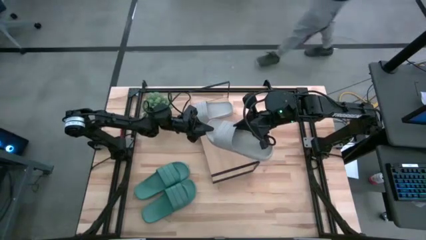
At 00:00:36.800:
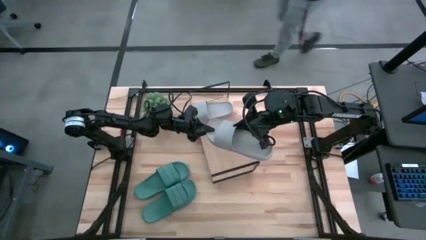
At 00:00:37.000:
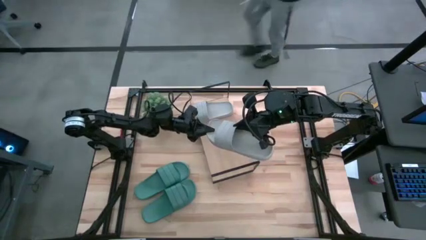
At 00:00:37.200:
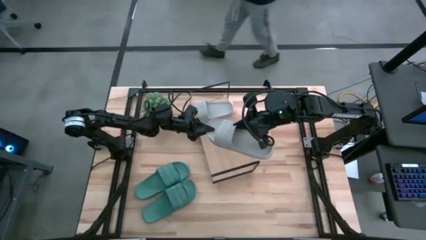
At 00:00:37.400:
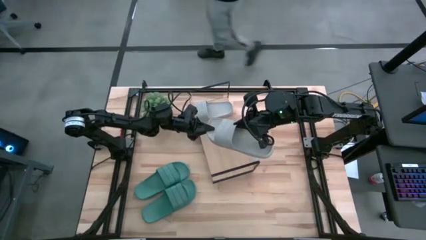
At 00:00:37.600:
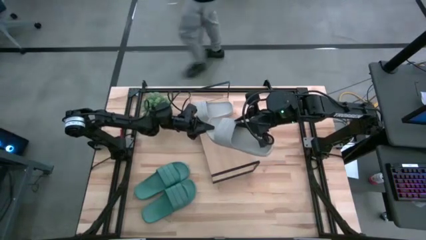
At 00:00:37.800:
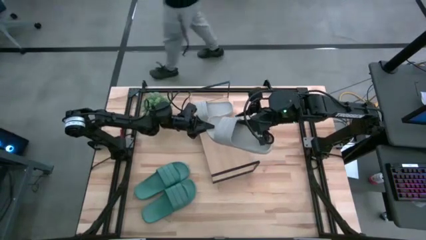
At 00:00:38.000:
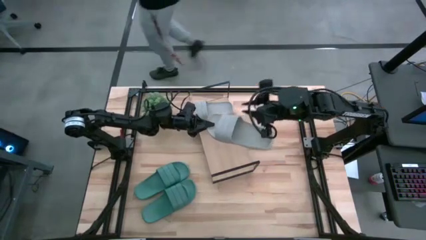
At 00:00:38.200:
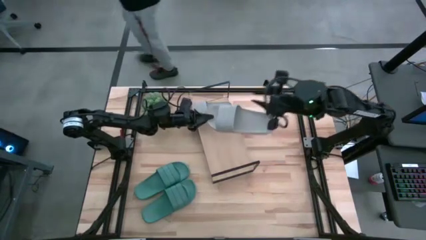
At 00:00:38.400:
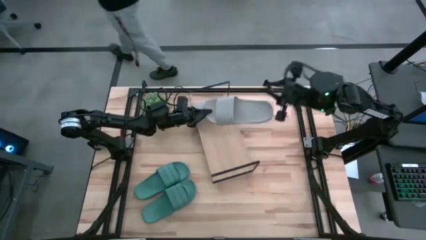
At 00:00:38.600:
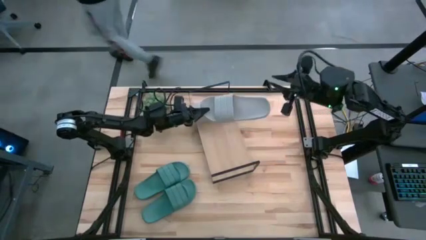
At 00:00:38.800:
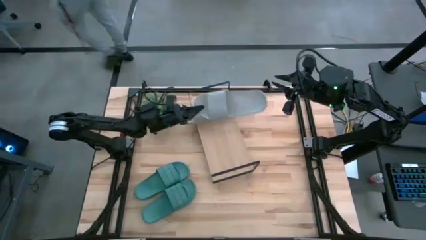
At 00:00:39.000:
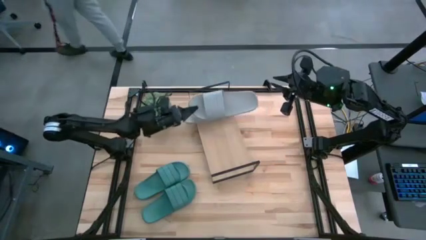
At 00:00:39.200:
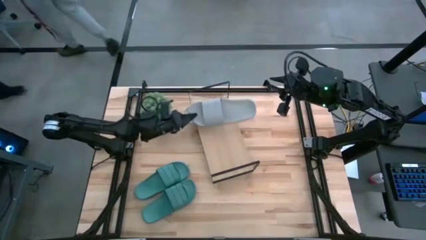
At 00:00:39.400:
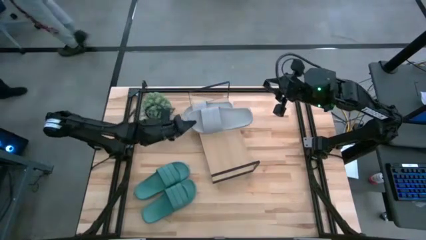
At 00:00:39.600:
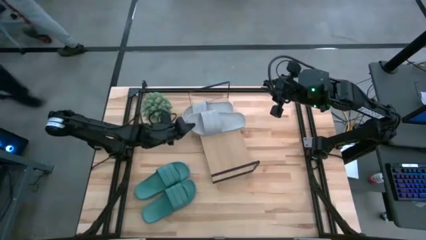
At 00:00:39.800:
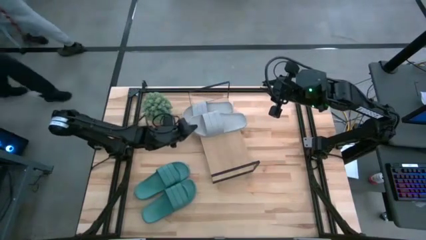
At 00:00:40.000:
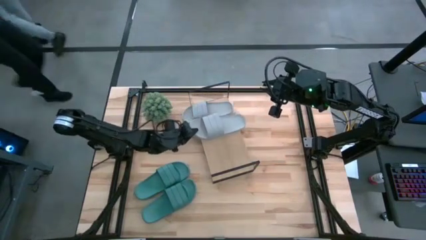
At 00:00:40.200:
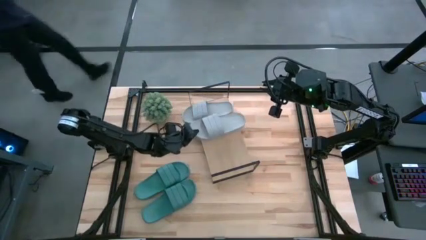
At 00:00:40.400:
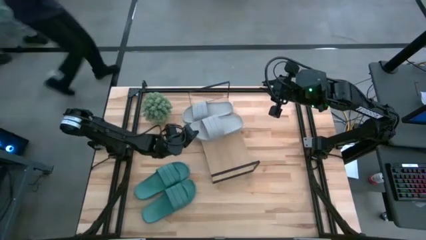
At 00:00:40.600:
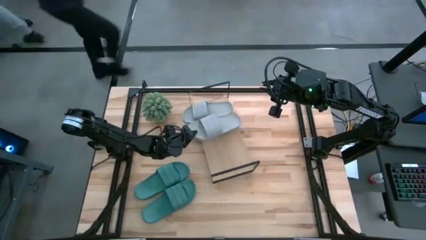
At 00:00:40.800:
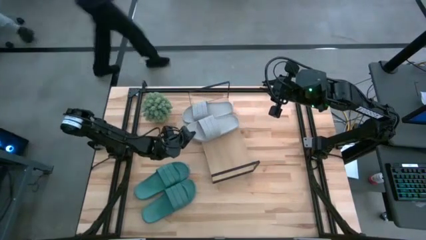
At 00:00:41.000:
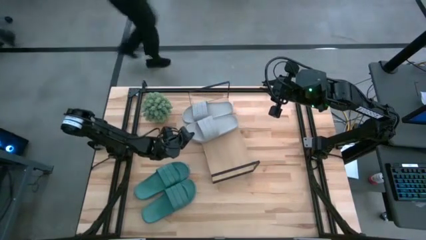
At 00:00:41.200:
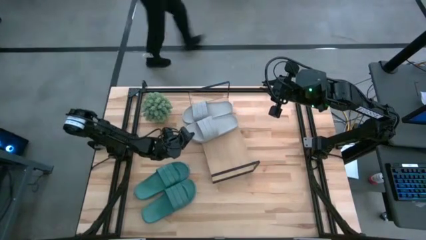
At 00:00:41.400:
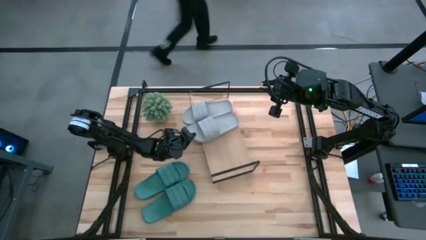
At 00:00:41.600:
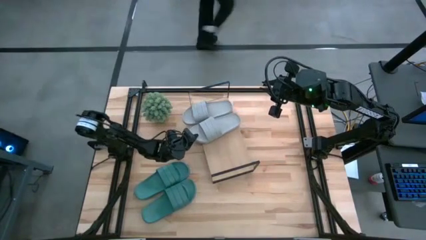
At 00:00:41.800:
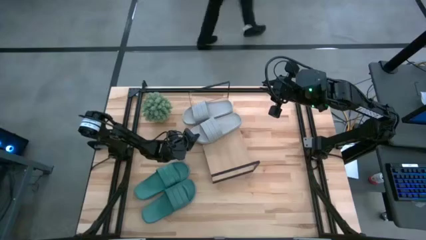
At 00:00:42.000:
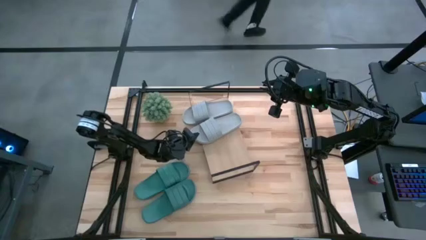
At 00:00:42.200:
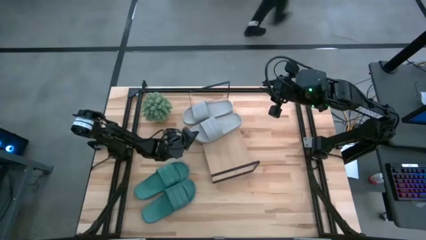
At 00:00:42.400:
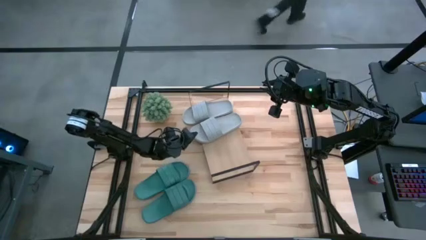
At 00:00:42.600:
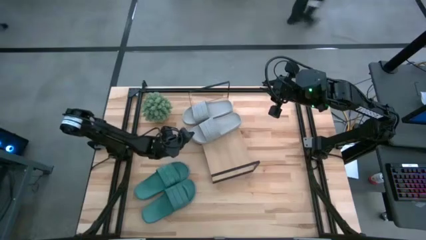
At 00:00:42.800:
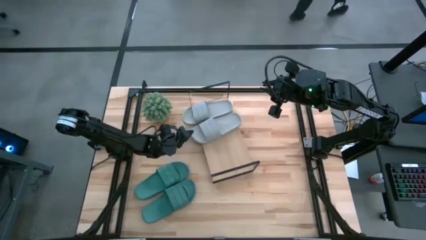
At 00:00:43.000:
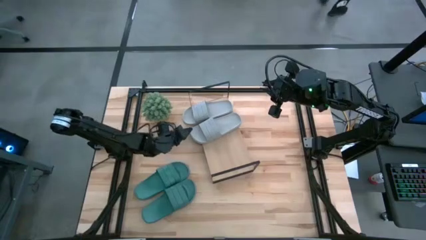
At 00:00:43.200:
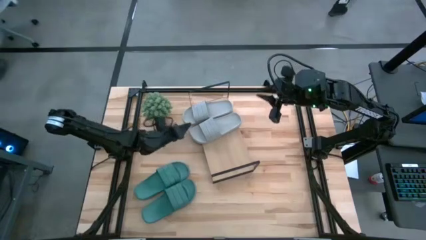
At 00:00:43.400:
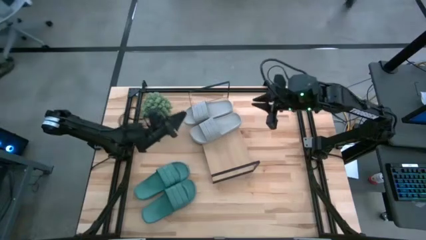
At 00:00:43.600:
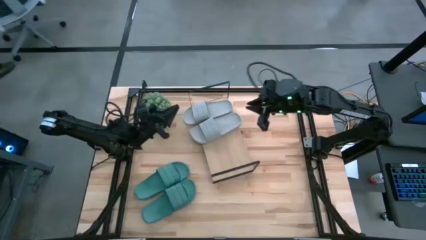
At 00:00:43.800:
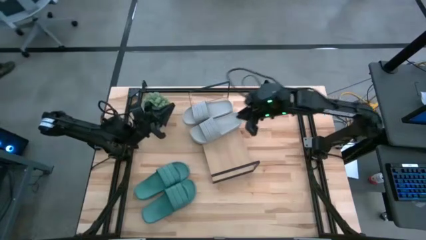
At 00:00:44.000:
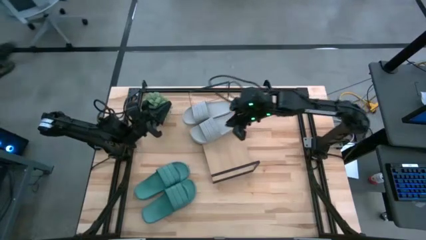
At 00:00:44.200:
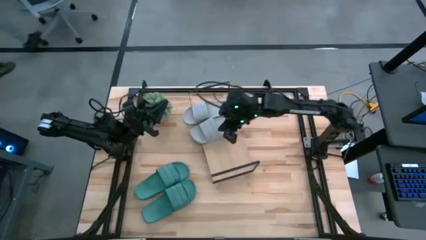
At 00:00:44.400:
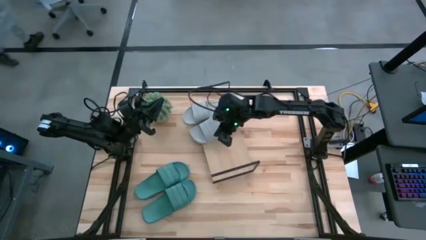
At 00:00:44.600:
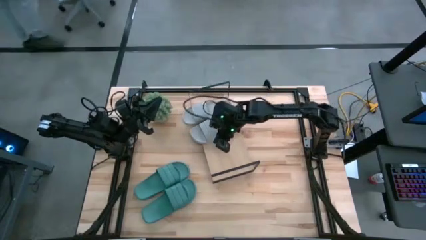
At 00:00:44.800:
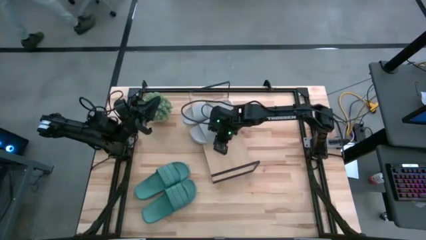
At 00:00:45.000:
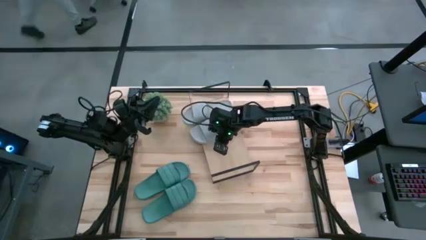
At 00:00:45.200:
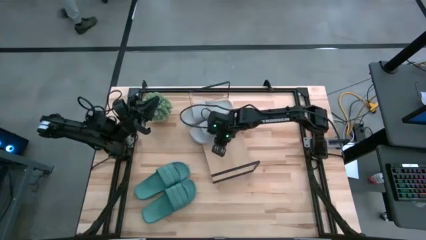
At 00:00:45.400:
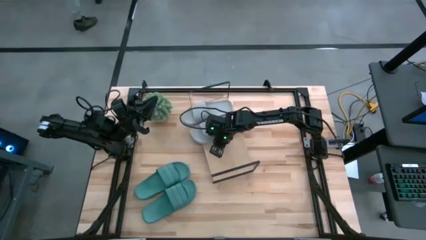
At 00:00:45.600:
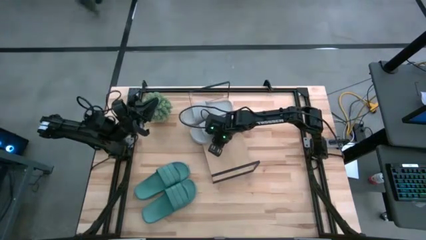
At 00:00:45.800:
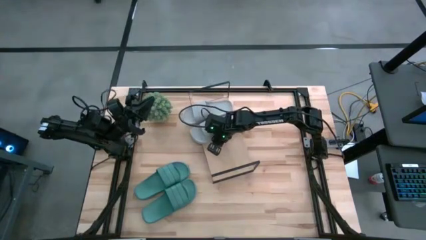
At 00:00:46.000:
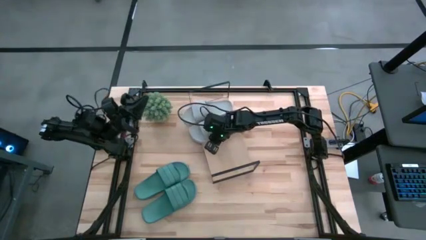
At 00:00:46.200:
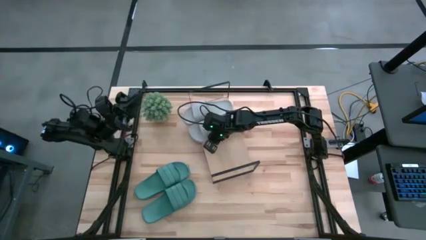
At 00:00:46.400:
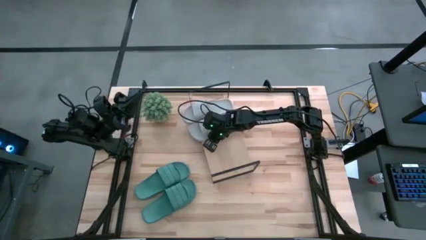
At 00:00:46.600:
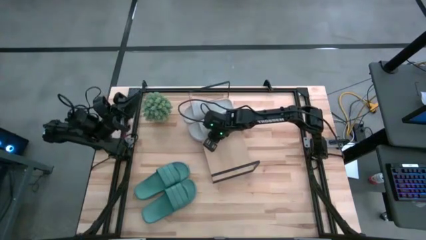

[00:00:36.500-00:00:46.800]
Task: Pick and place slides into the shelf
Put the gray slipper on the shelf
